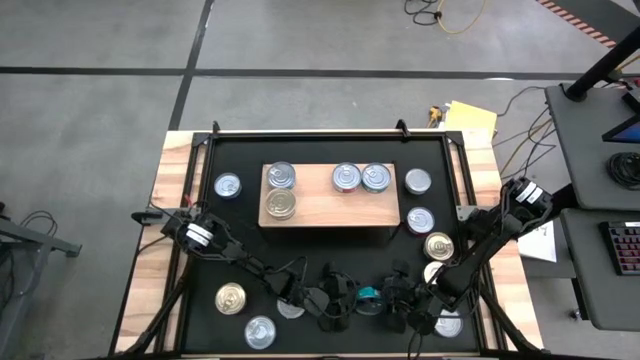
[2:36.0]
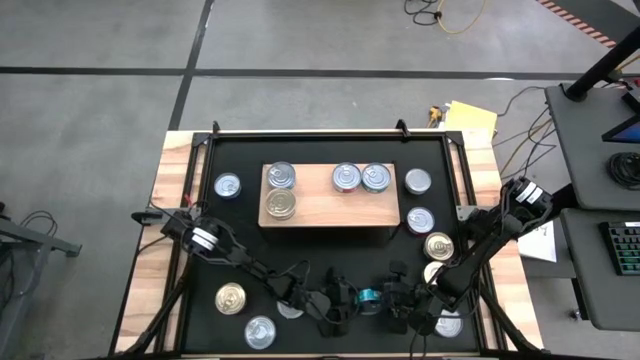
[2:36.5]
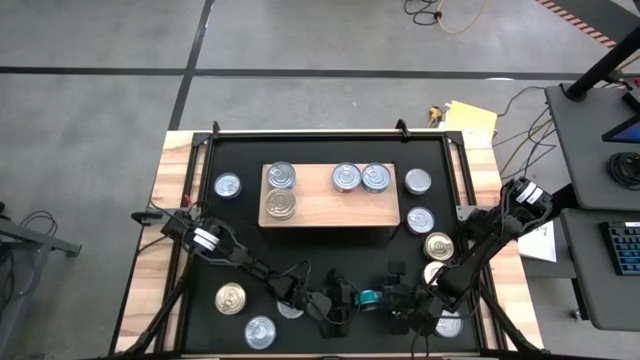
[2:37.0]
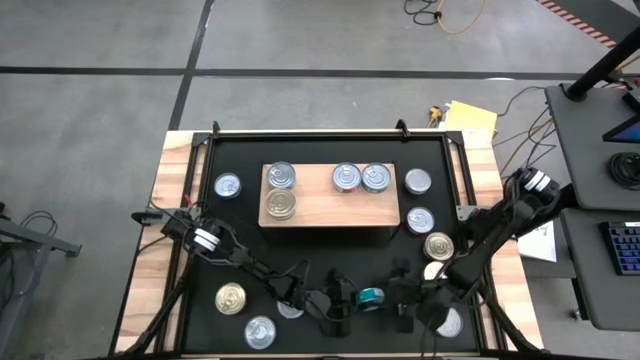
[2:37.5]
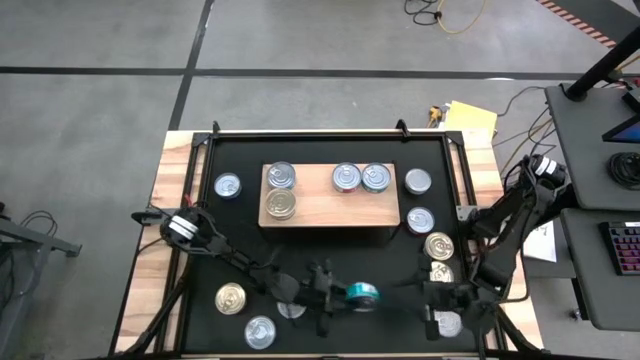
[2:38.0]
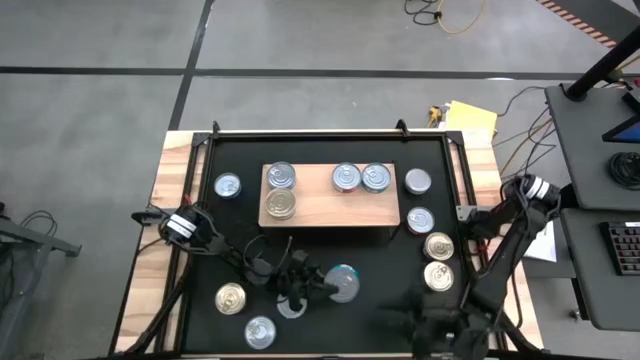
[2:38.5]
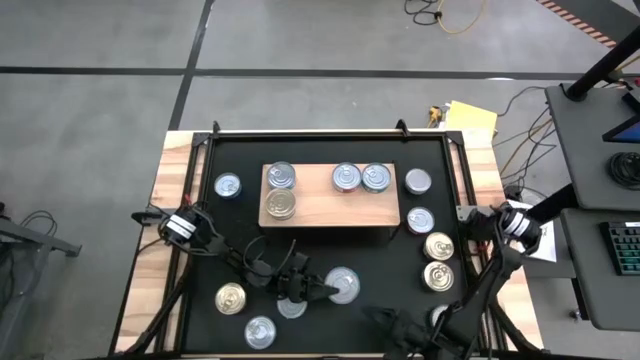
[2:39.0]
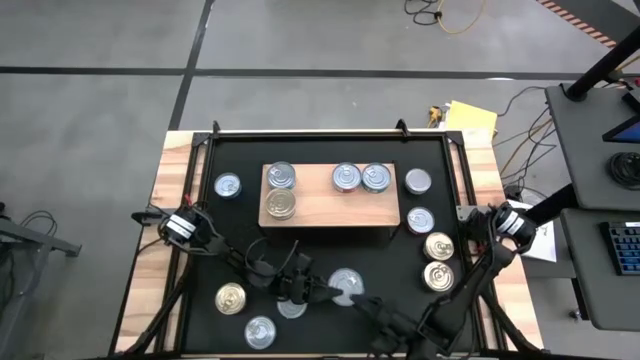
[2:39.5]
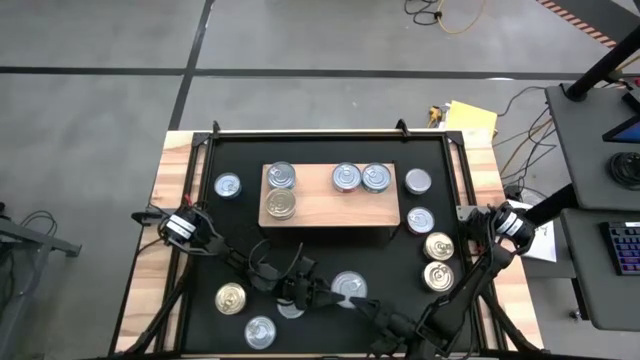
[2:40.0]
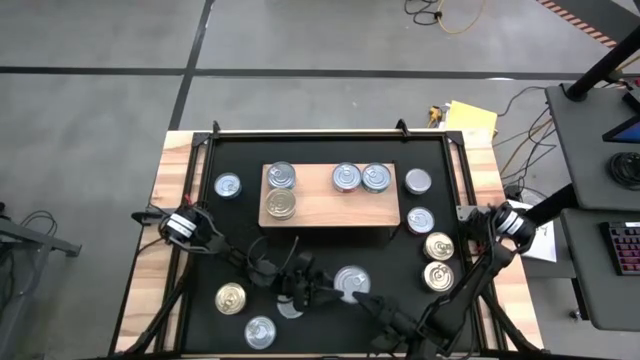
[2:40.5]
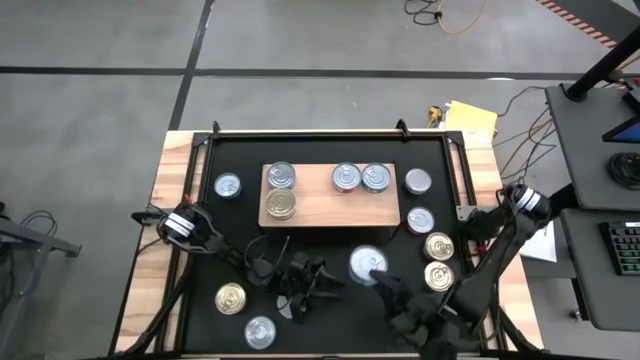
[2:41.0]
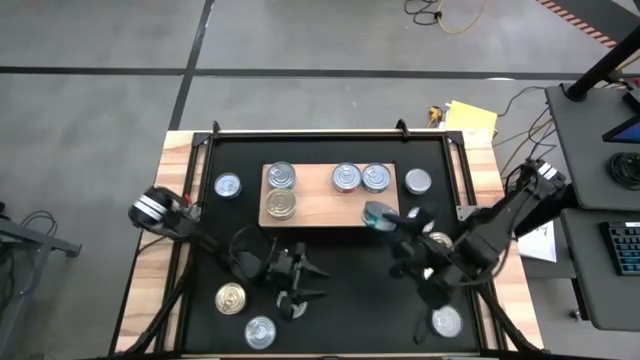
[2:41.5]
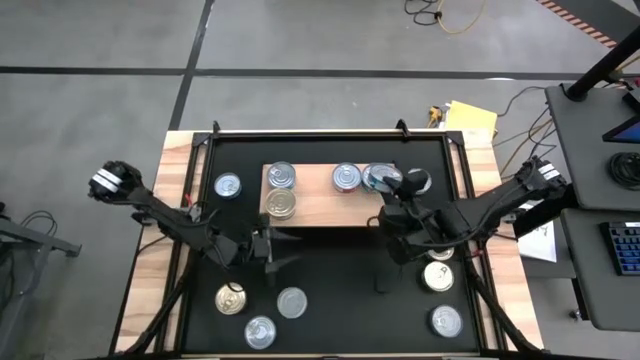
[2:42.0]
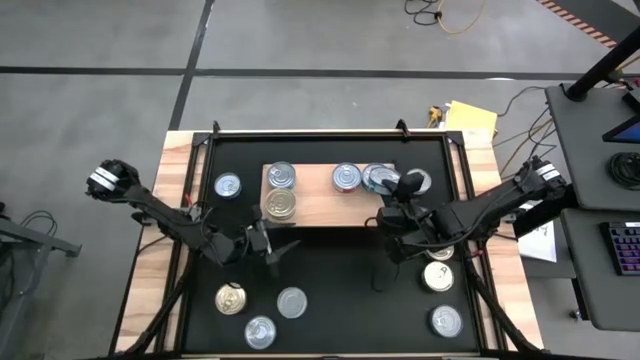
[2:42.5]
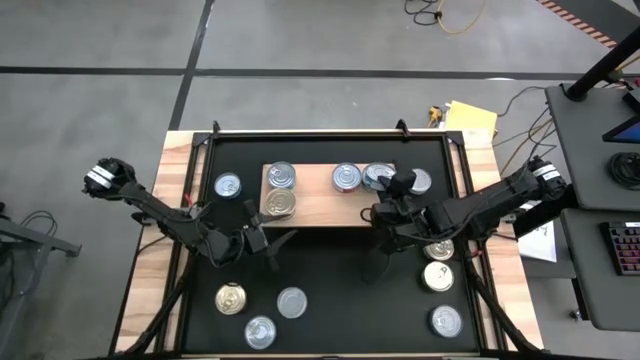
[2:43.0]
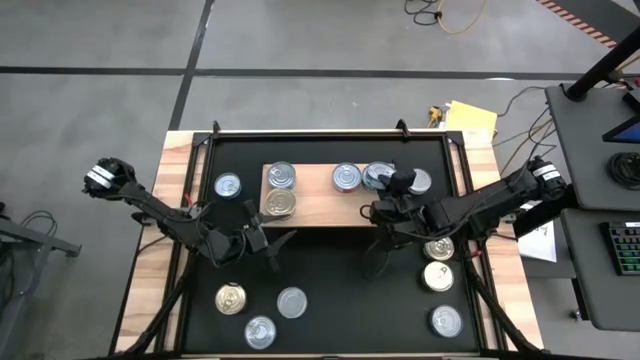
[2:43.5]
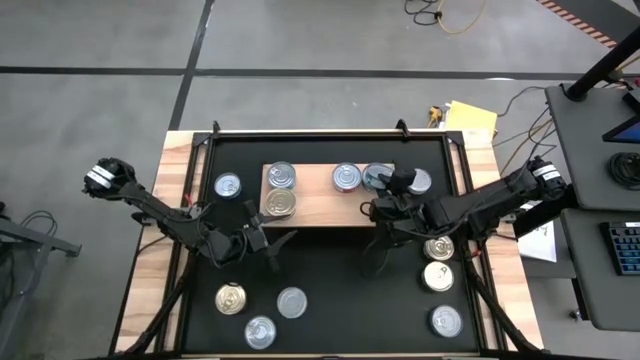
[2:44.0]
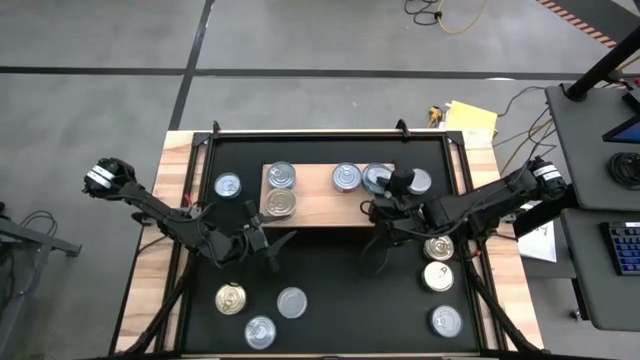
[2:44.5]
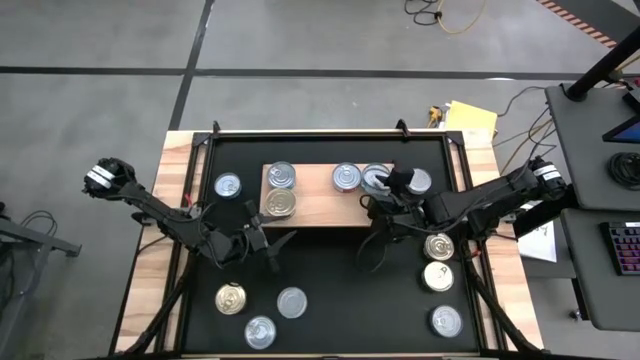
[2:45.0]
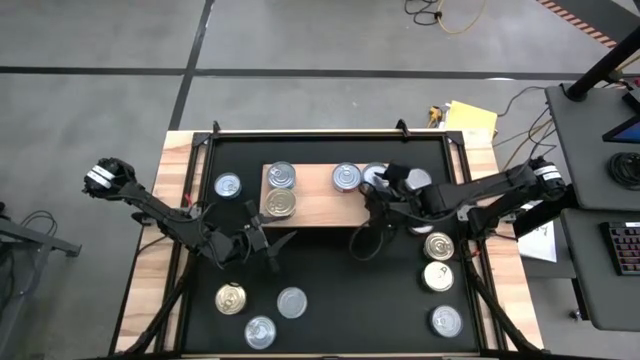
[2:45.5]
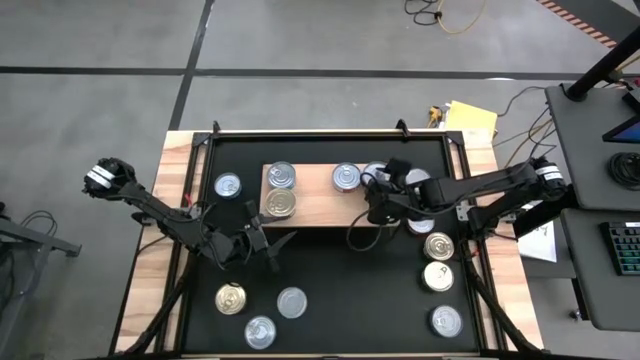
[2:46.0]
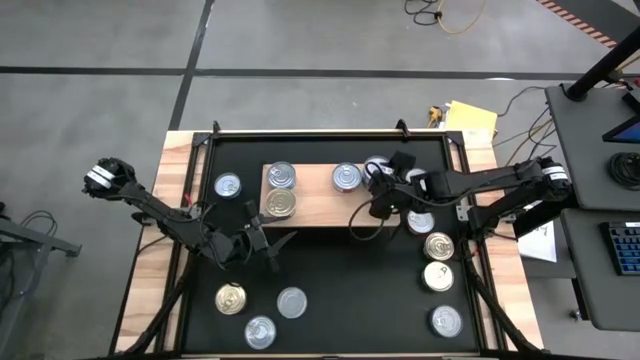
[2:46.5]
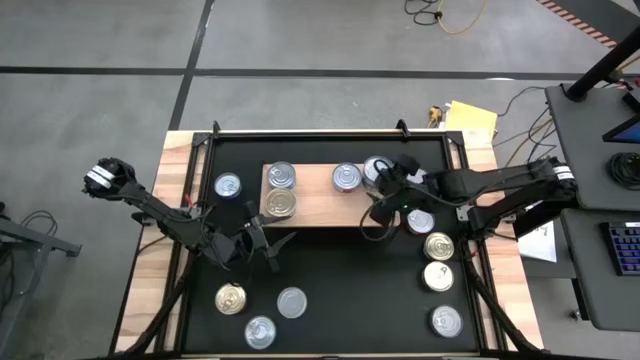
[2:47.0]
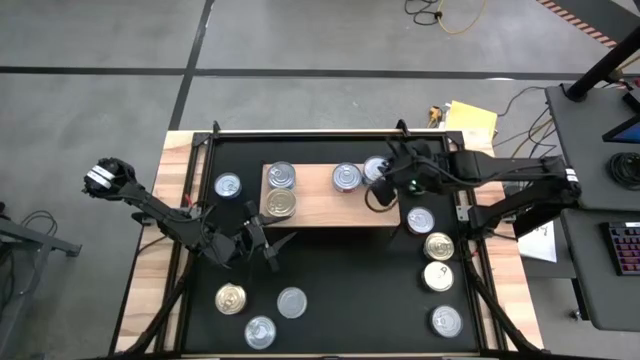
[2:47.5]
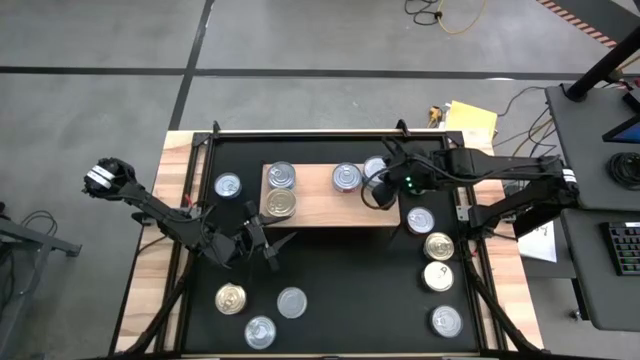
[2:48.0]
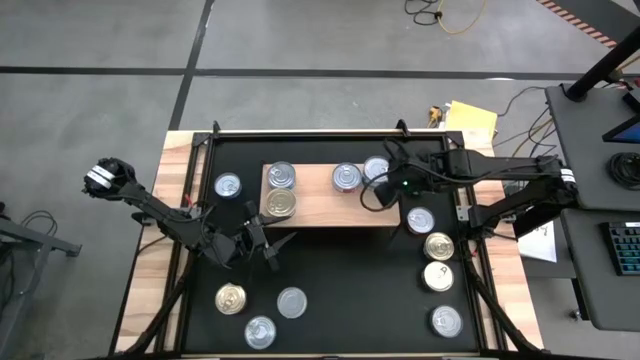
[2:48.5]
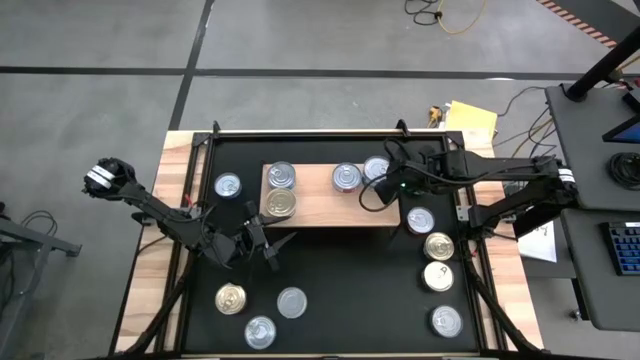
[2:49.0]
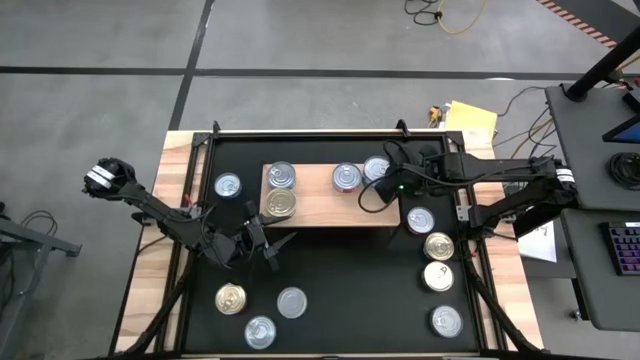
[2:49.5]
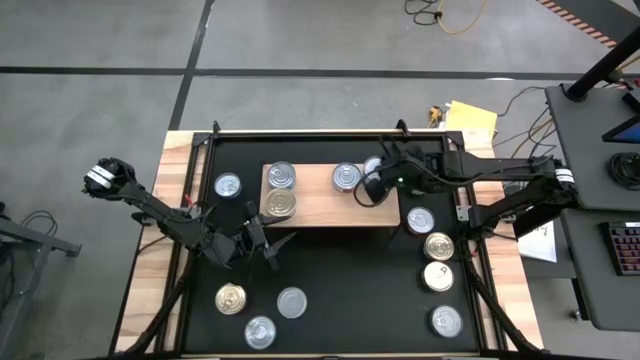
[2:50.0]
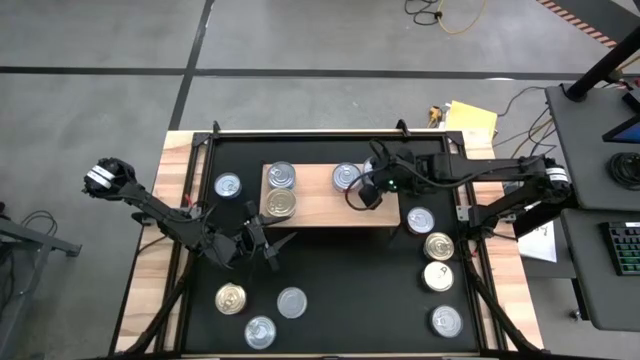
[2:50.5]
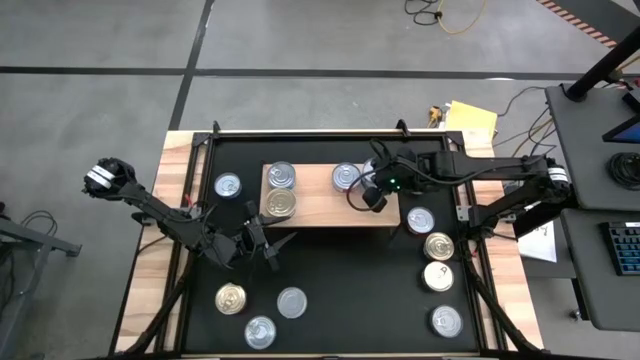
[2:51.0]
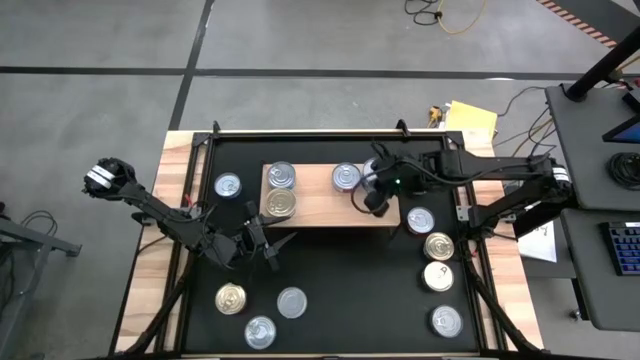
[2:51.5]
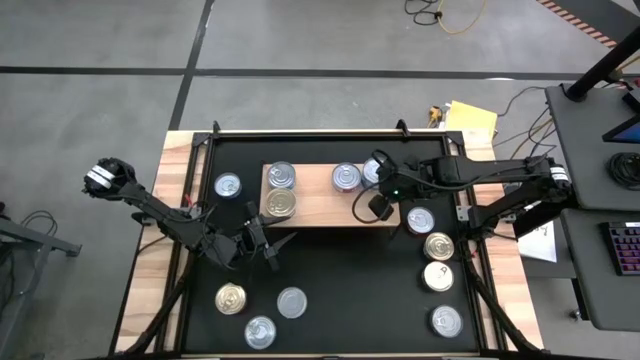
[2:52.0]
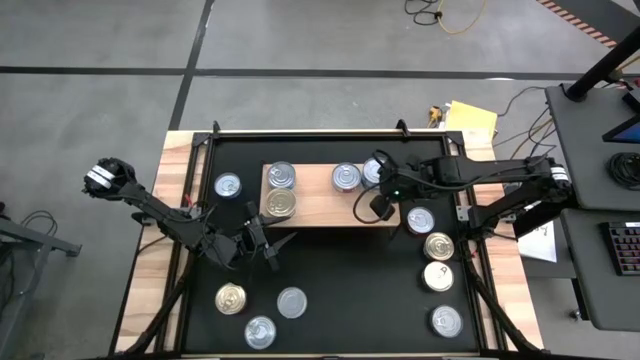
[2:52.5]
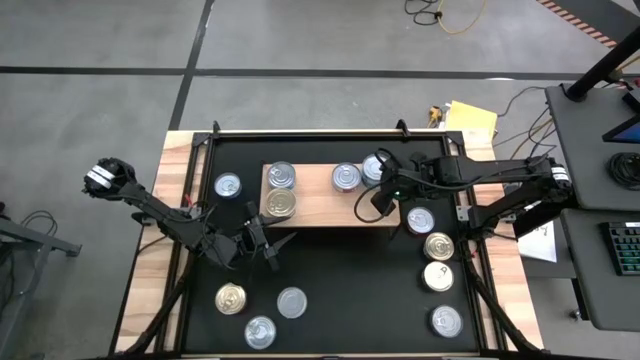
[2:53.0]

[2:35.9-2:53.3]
Task: Stack canned seafood by type on shelf
Stack the light green tuna can on the light green tuna can

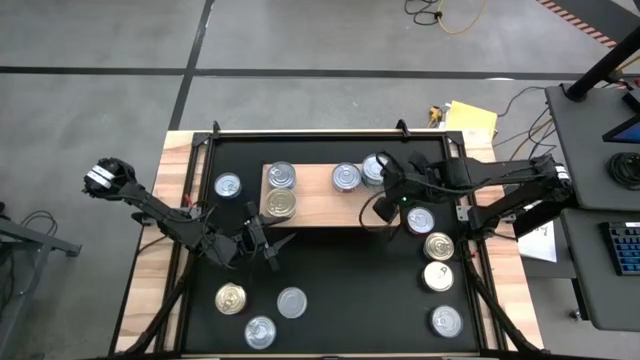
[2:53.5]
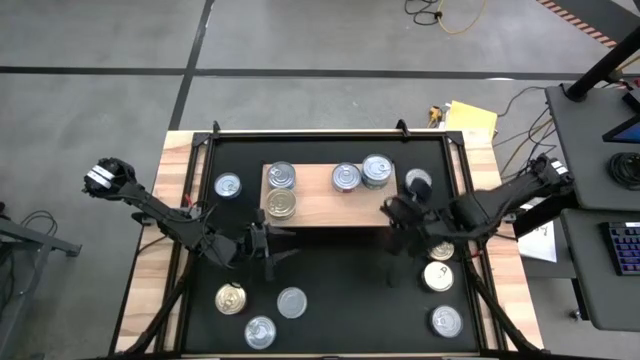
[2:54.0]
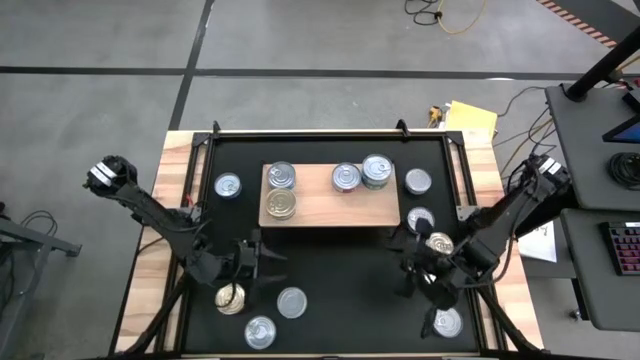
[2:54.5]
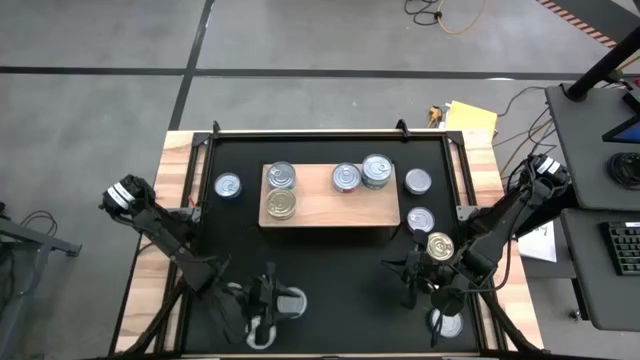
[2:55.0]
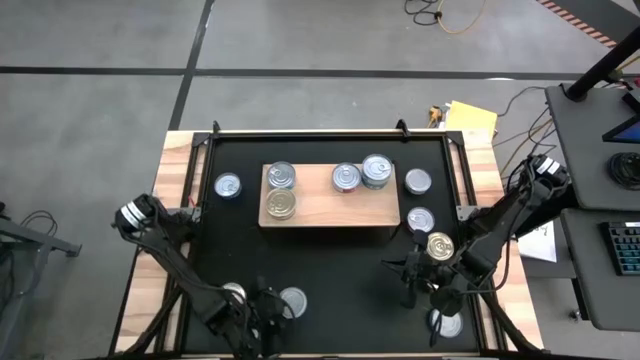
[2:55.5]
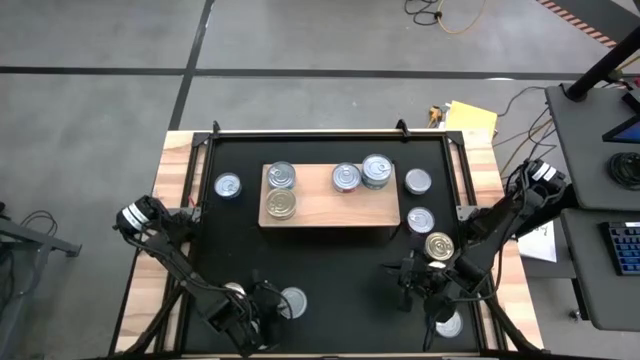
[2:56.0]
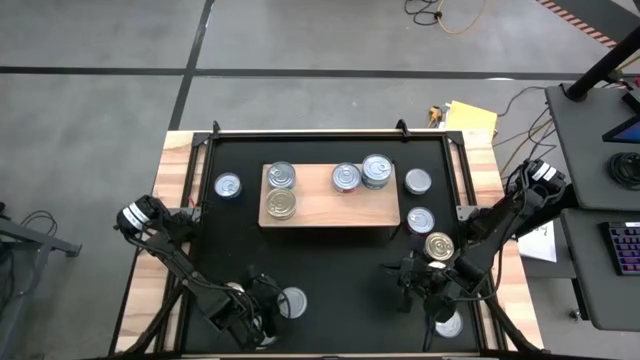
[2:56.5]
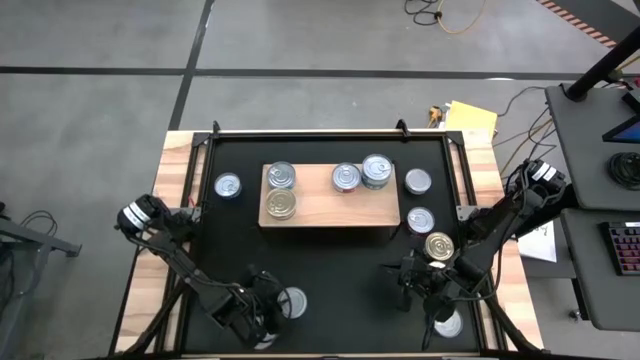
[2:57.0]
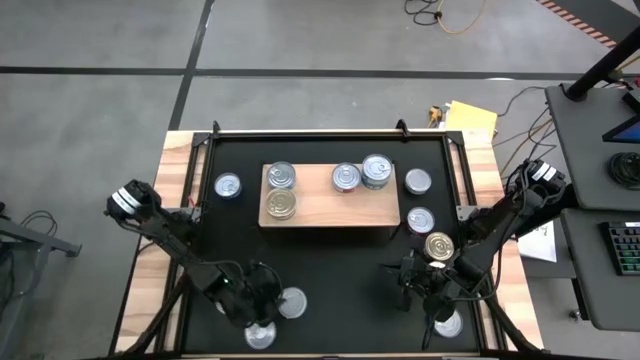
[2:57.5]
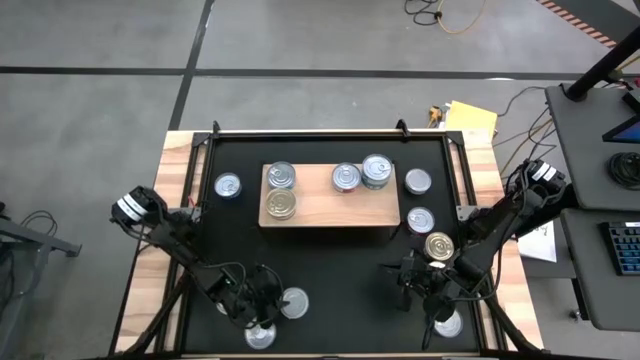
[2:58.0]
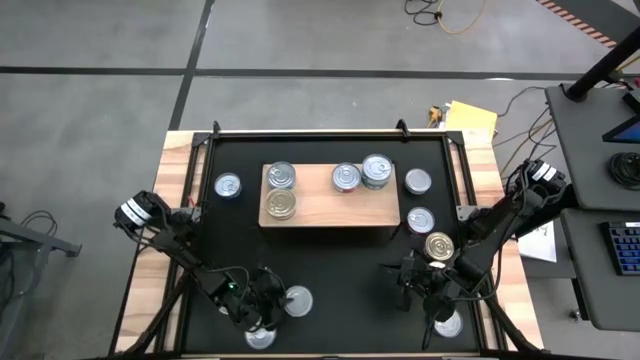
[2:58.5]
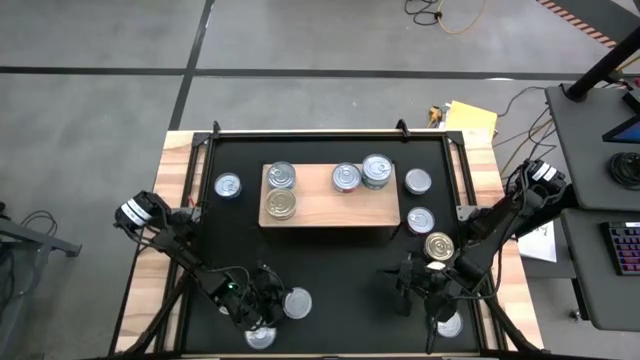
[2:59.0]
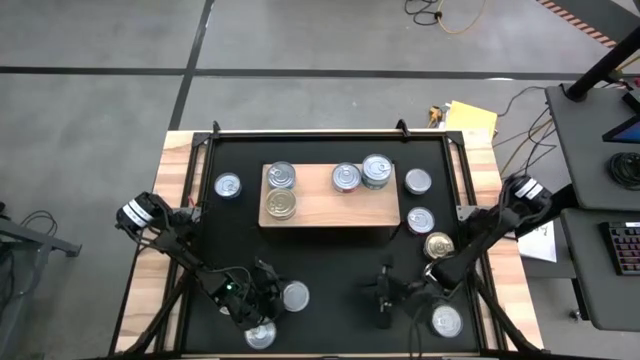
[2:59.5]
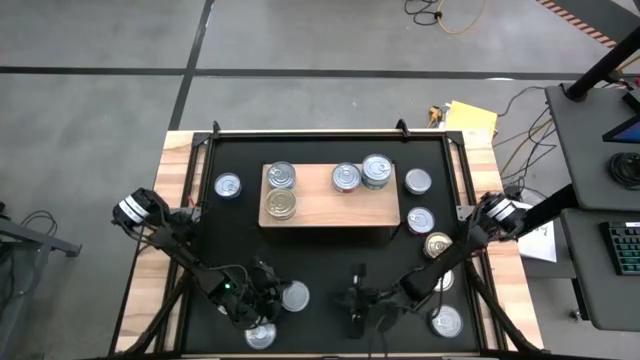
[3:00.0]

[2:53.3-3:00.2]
Put the green tuna can on the shelf
